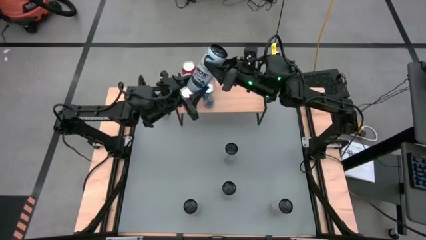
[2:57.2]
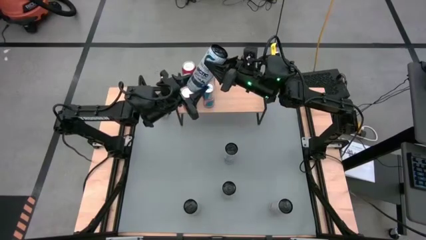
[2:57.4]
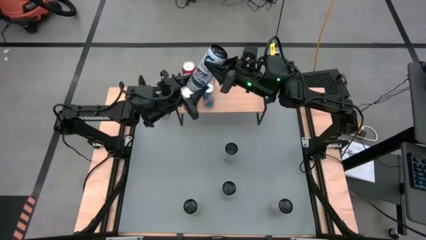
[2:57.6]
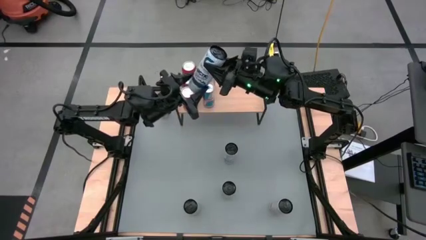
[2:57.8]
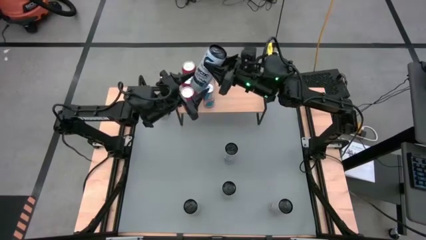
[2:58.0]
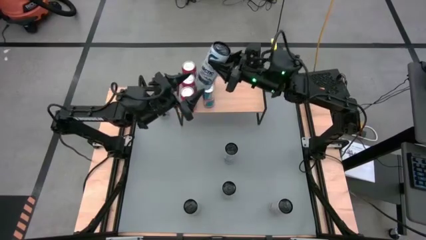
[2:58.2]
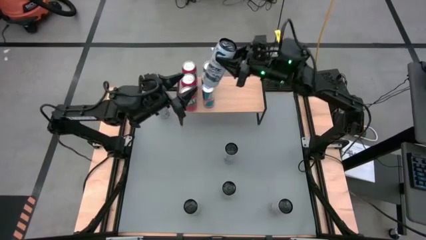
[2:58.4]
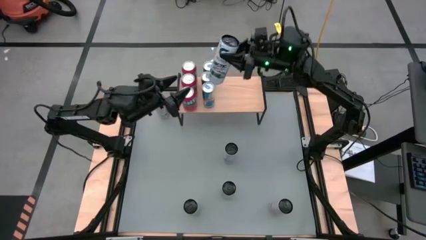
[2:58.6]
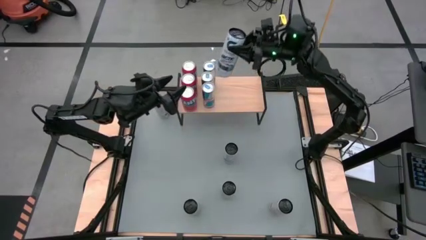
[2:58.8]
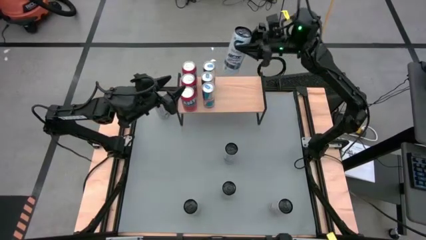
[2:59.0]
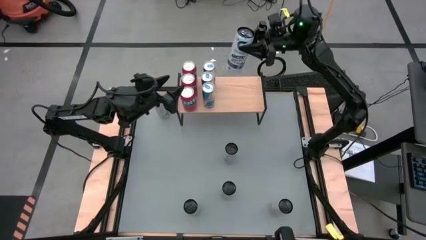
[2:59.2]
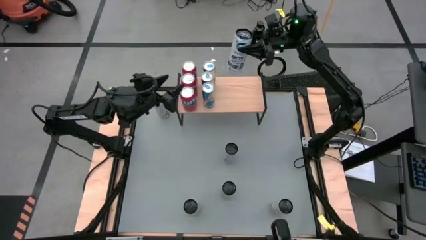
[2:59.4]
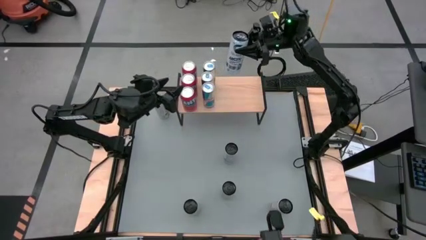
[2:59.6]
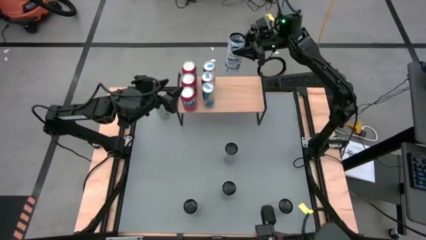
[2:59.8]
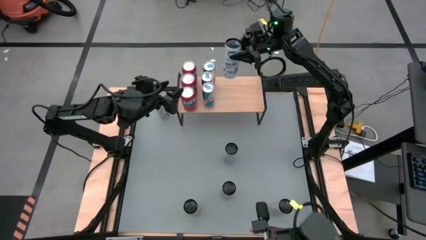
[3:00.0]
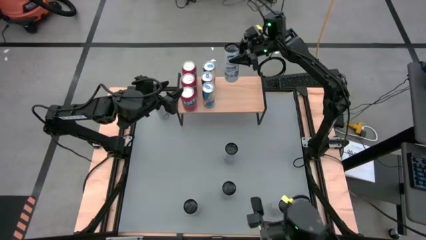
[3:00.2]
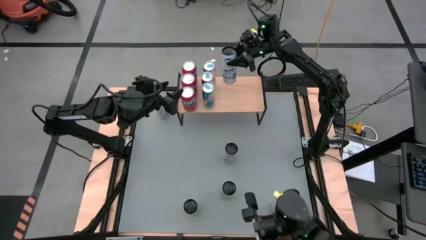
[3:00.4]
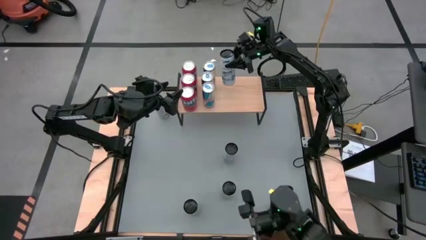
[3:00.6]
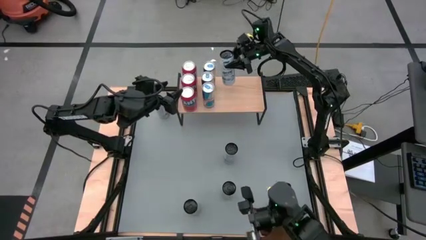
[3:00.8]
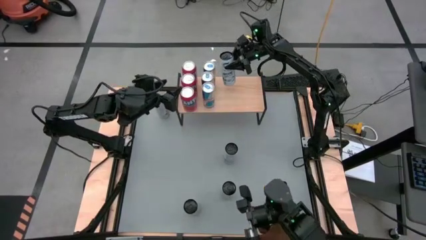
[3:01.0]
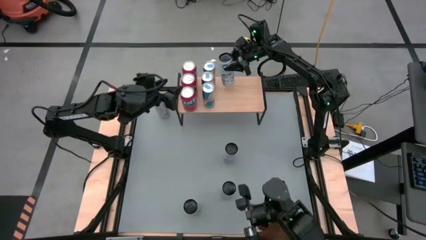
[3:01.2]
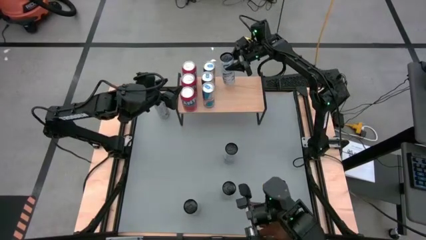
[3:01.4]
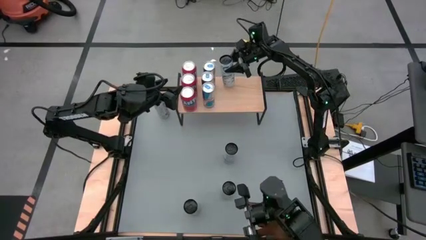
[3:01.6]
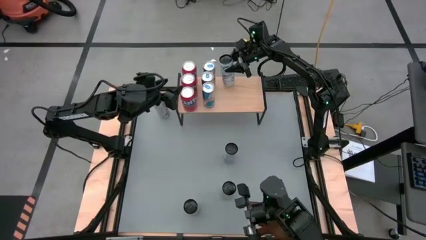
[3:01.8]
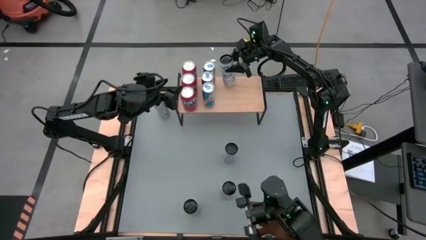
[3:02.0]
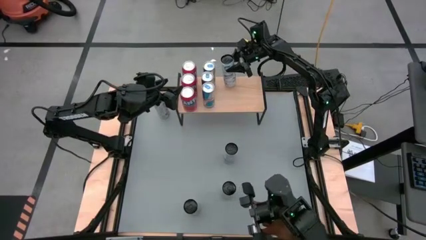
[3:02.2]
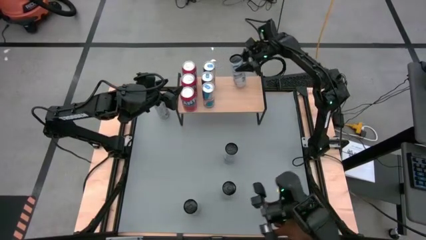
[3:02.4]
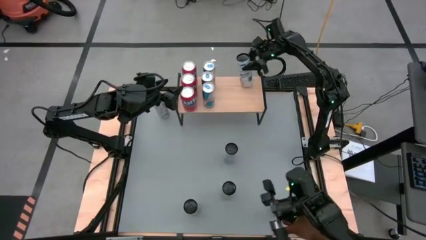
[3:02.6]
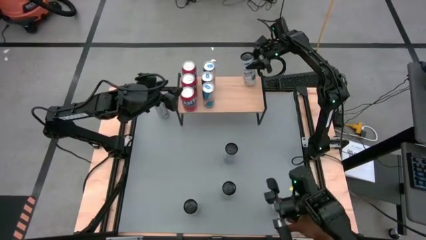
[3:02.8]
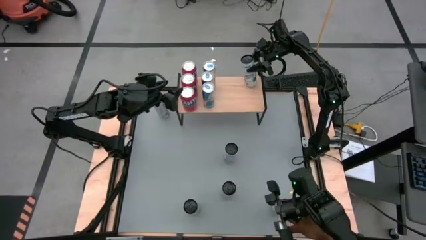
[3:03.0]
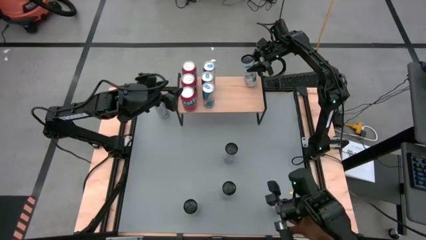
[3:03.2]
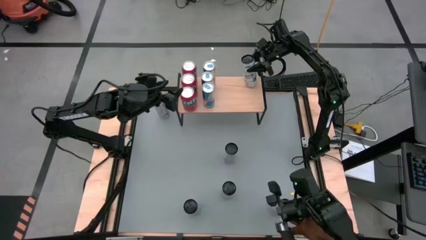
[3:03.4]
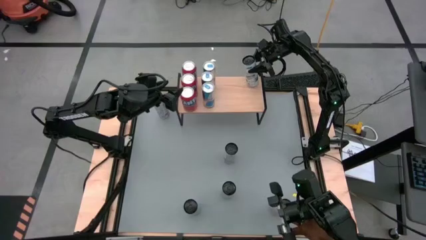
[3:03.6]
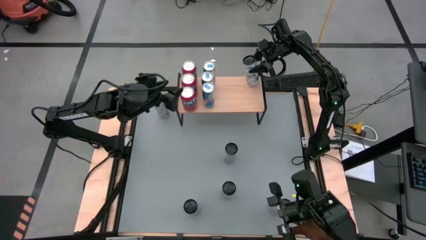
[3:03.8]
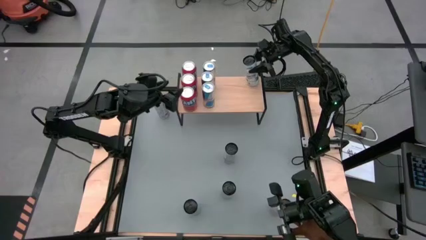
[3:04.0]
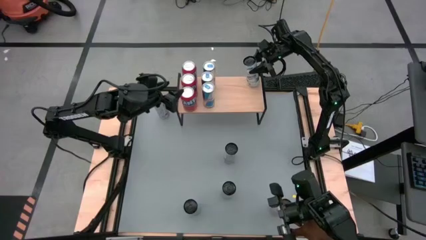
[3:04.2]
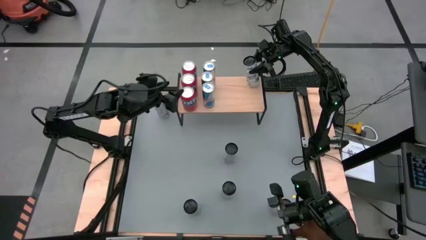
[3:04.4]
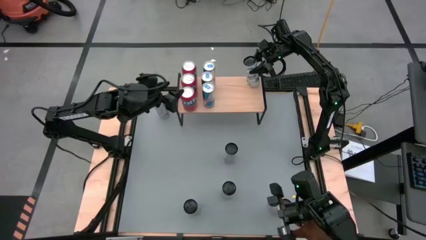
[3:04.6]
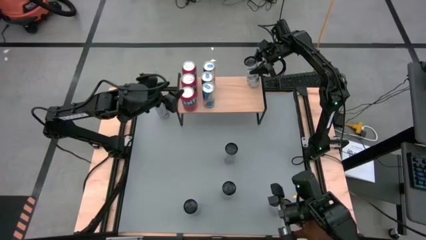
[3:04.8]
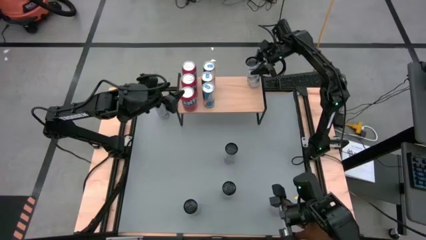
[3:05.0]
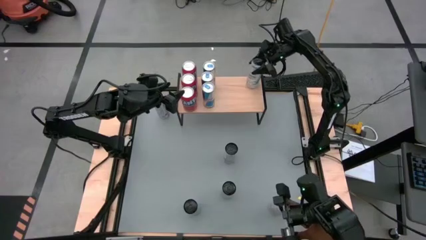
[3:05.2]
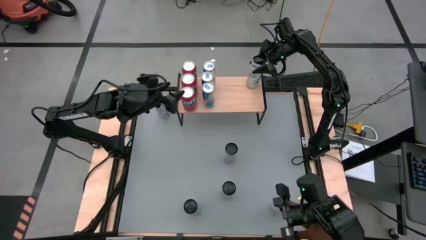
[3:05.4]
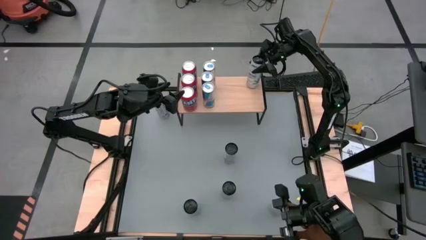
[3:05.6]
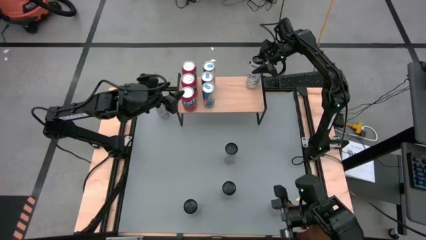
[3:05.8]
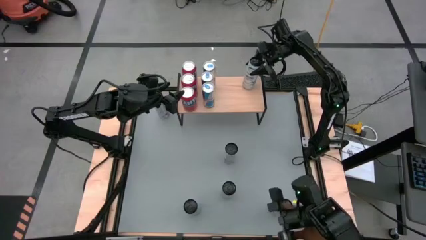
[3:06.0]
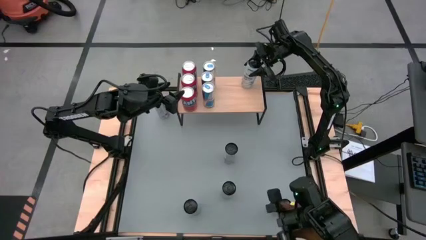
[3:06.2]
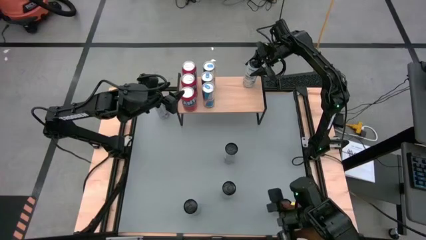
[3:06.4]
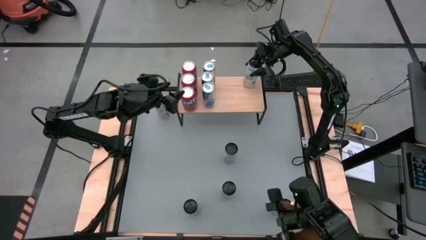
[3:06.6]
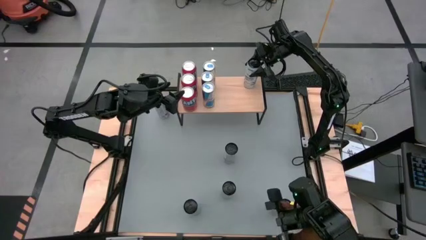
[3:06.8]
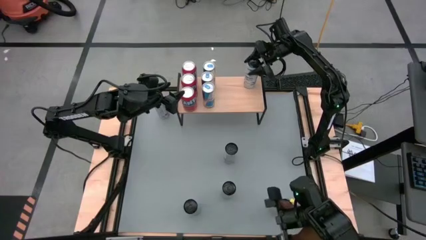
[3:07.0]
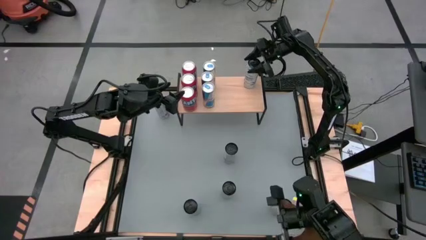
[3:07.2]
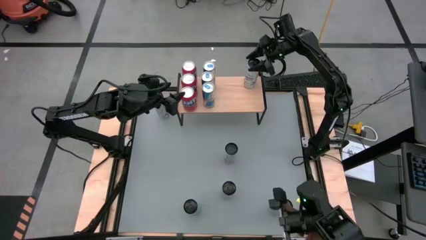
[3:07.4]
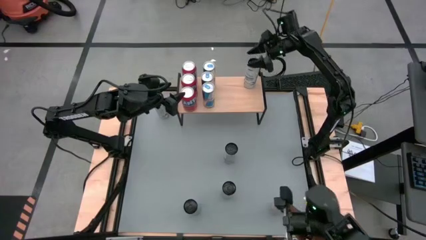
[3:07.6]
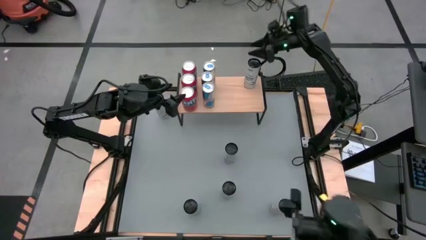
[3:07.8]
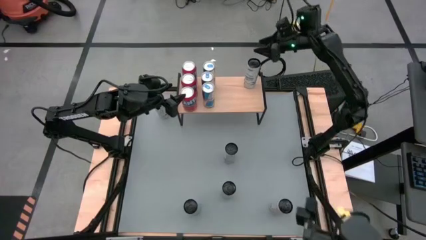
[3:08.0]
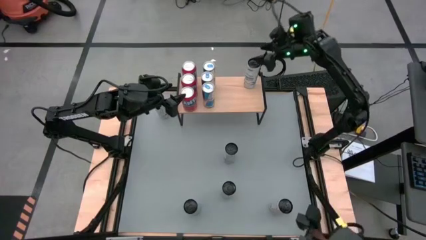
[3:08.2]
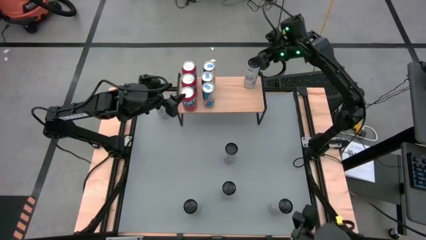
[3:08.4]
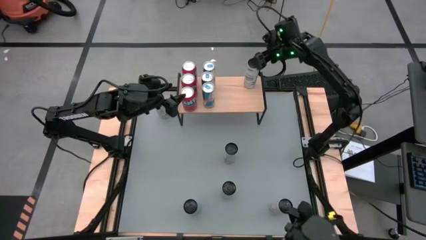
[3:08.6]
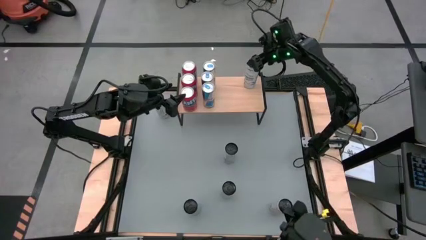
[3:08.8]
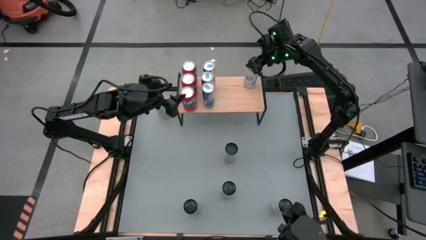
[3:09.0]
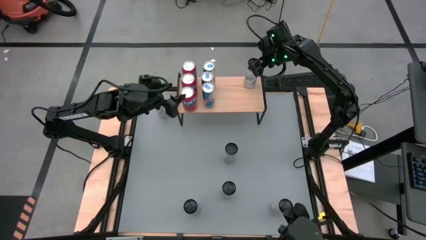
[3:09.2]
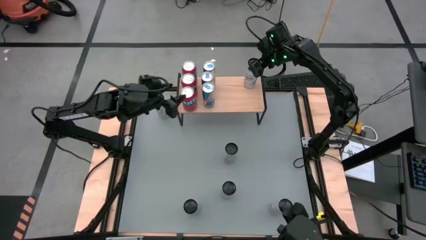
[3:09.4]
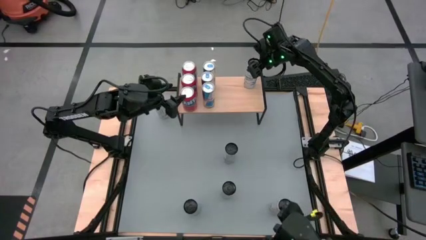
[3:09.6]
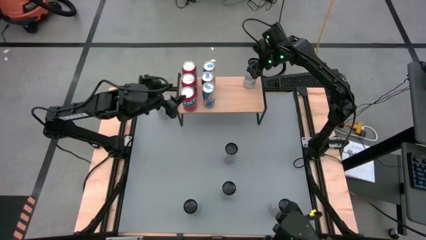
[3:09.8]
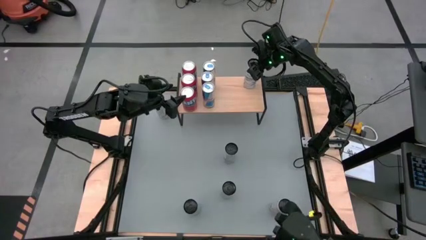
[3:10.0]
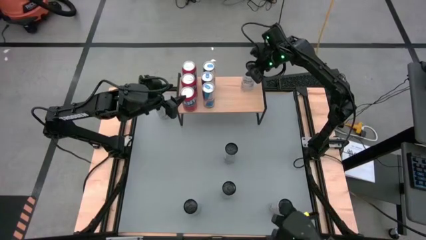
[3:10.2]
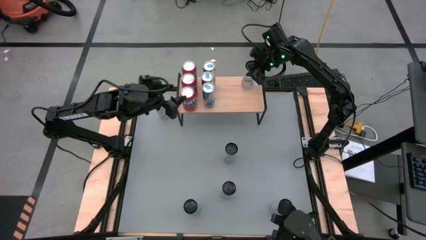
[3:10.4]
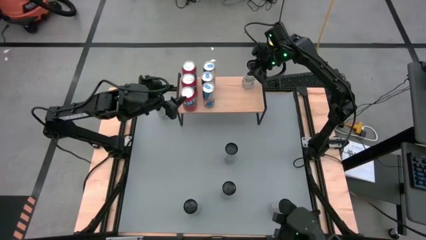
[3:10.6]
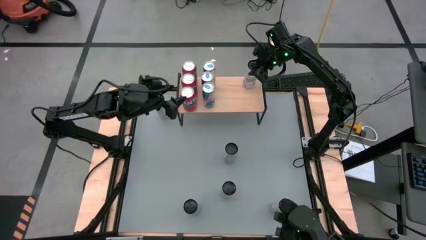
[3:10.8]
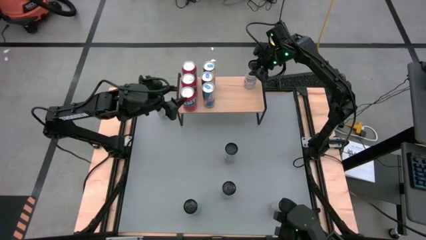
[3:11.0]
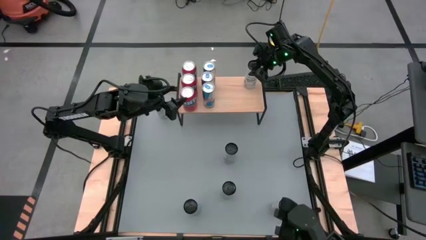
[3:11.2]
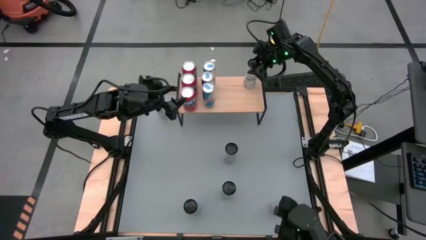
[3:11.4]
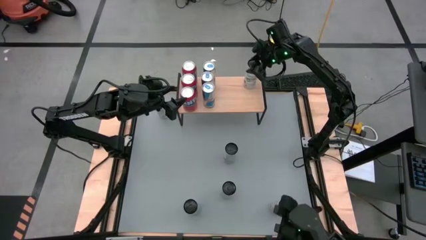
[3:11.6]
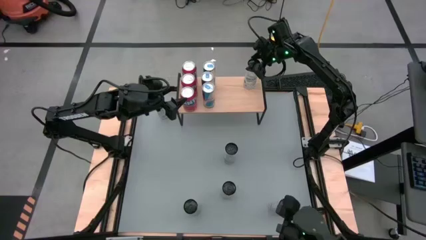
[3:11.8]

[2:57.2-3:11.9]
Task: Place canned beverage on shelf
Put the top right white-blue soda can on the shelf

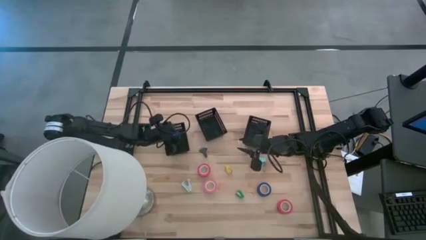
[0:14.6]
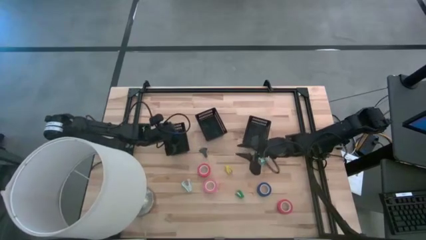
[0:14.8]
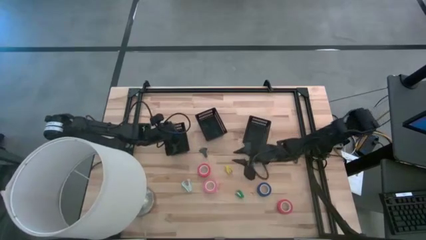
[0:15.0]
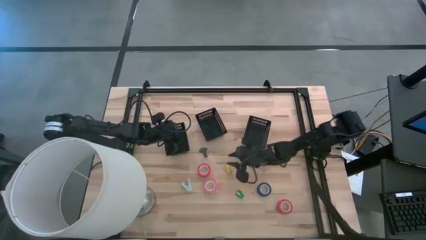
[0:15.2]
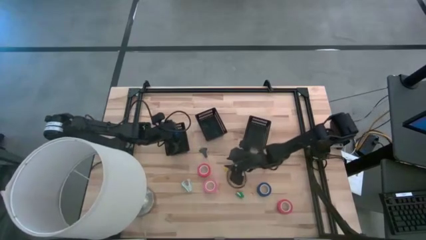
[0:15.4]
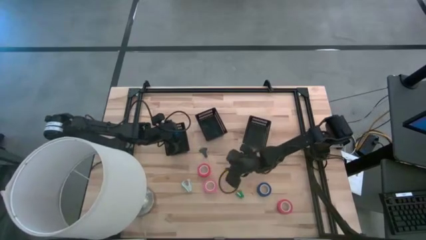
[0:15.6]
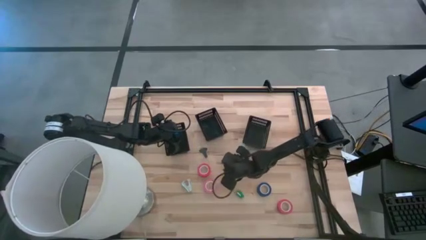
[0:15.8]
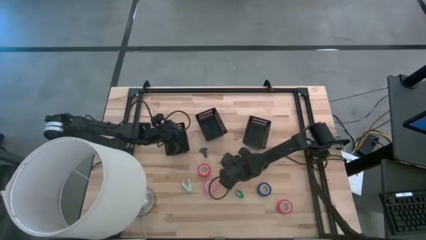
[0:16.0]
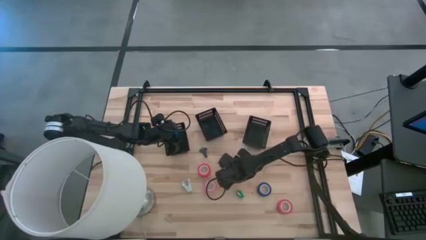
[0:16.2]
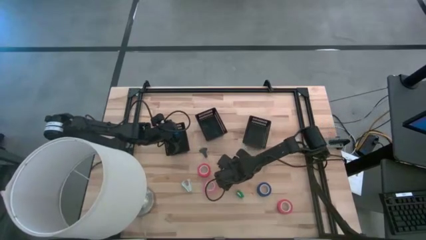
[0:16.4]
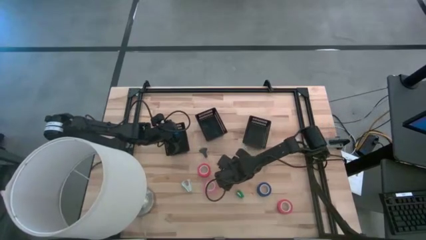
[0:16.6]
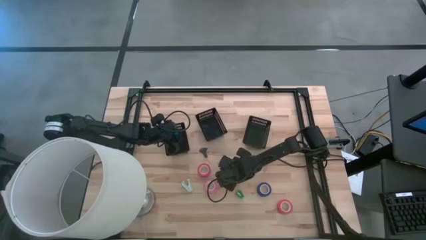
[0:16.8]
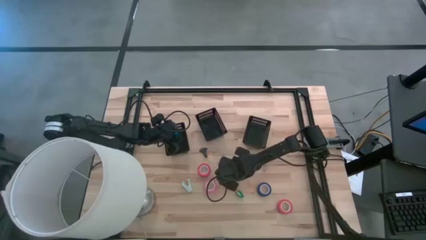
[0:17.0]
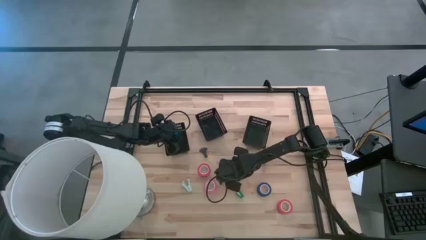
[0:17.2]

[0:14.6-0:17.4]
Task: Pick and place Stapler, Stapler remover, tape
Put the yellow stapler into the left black bin
